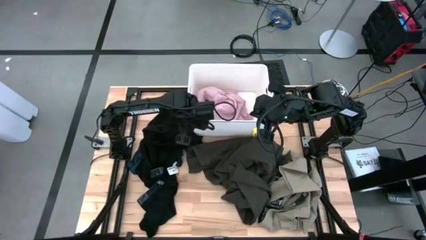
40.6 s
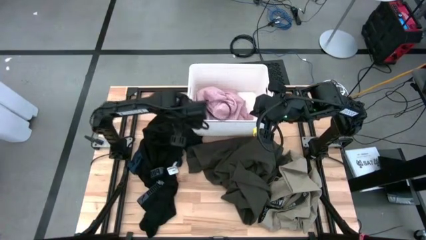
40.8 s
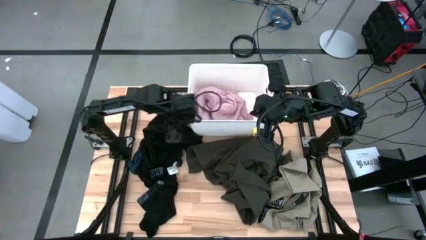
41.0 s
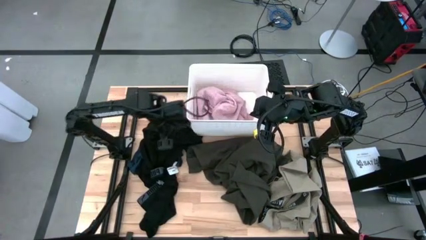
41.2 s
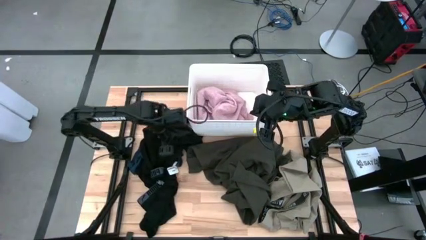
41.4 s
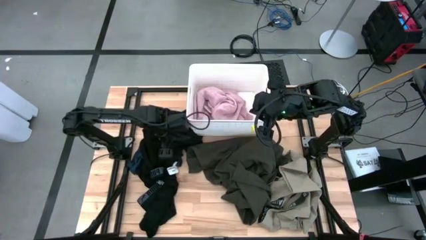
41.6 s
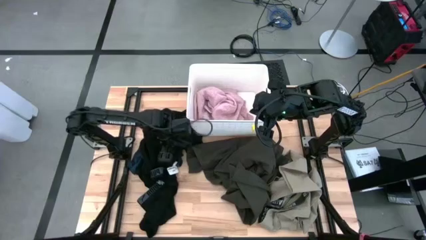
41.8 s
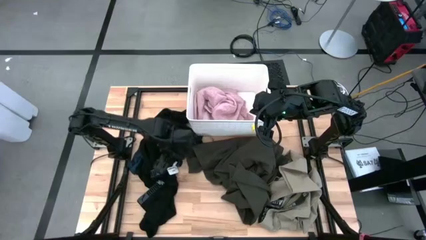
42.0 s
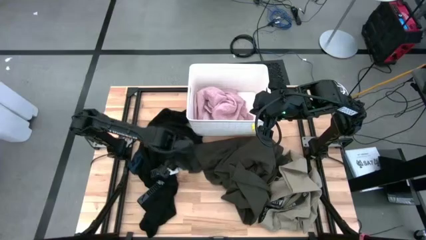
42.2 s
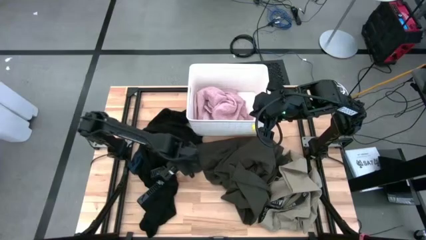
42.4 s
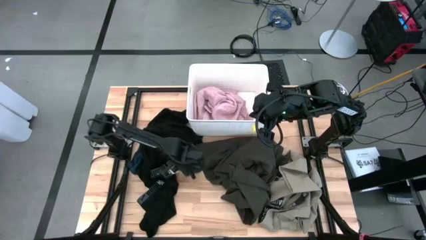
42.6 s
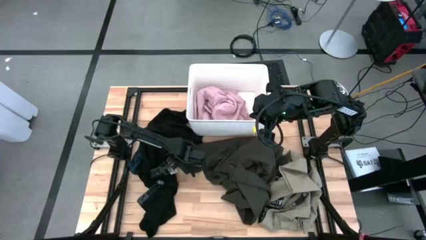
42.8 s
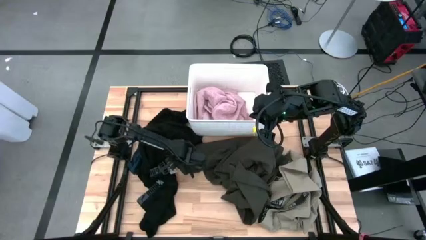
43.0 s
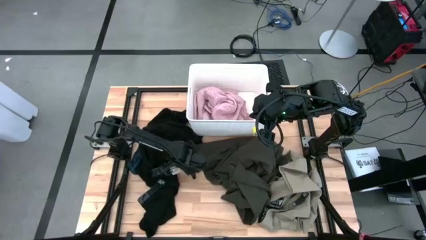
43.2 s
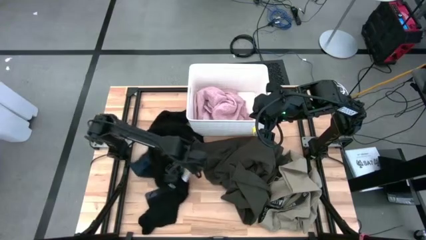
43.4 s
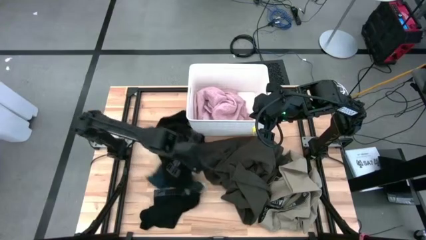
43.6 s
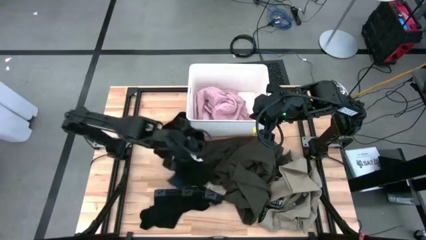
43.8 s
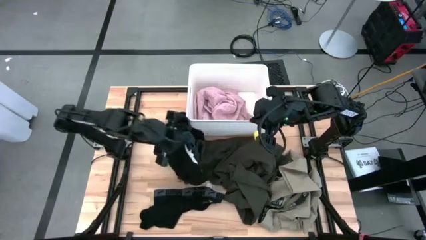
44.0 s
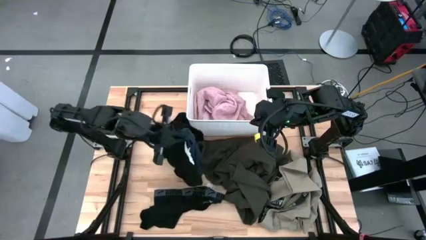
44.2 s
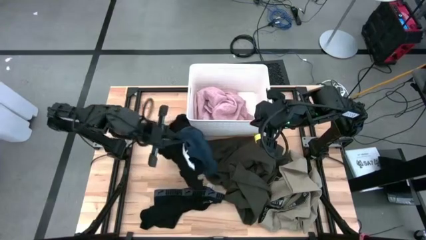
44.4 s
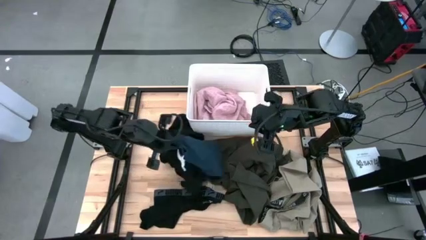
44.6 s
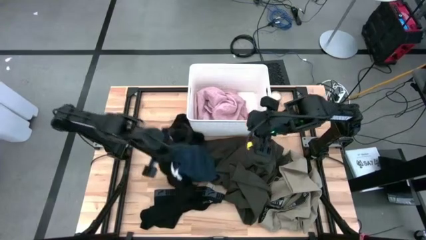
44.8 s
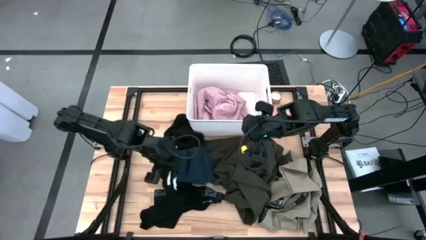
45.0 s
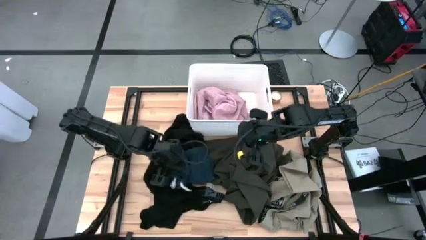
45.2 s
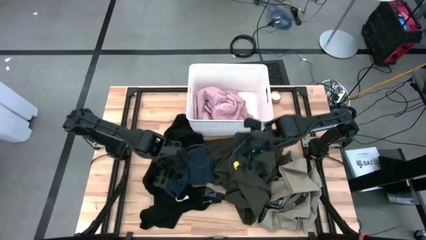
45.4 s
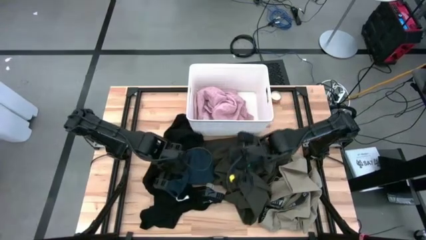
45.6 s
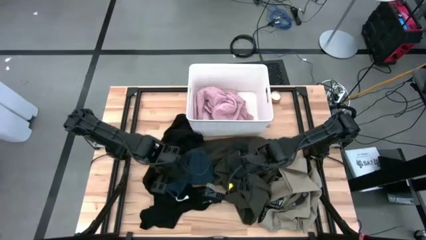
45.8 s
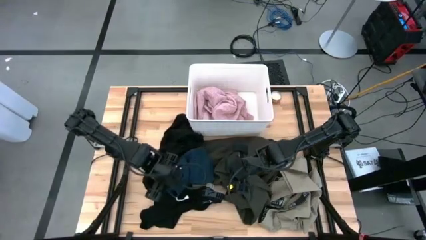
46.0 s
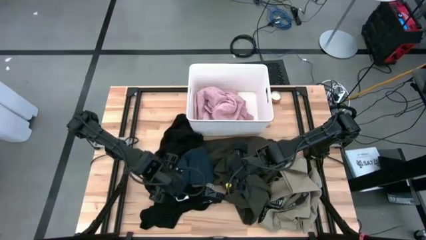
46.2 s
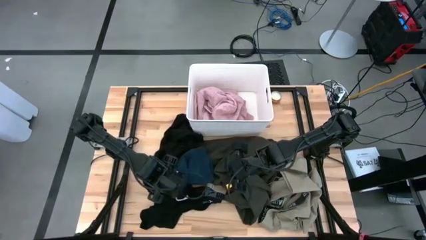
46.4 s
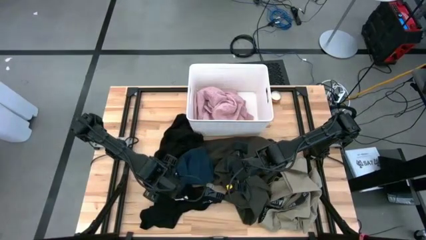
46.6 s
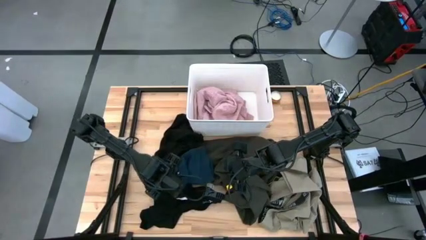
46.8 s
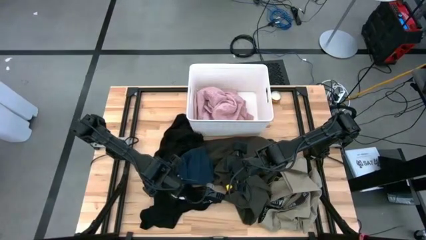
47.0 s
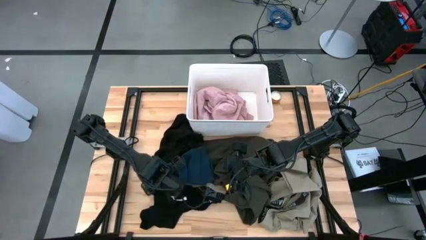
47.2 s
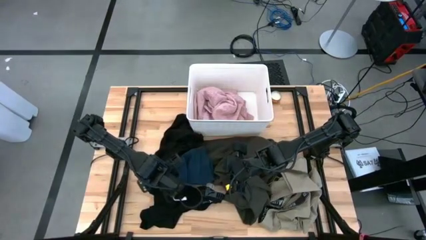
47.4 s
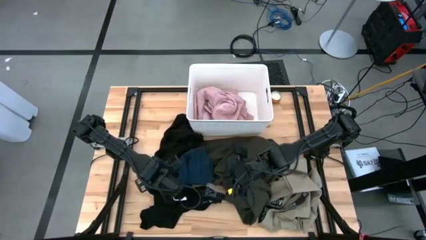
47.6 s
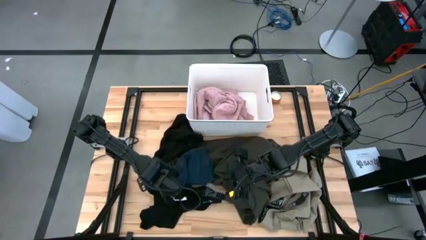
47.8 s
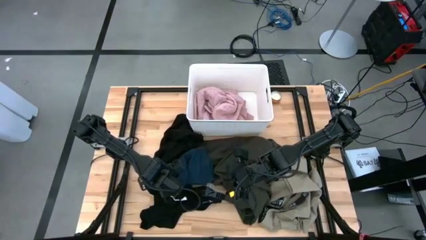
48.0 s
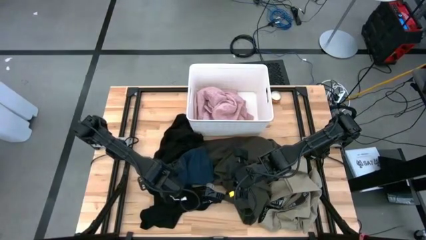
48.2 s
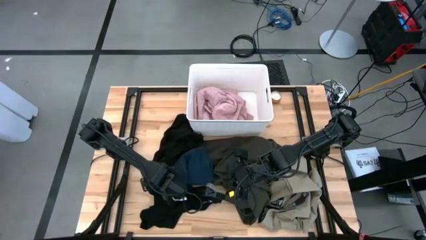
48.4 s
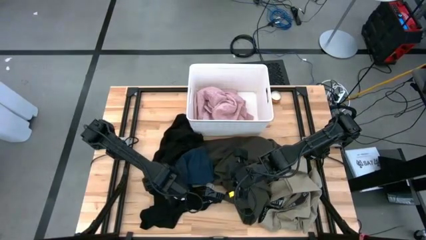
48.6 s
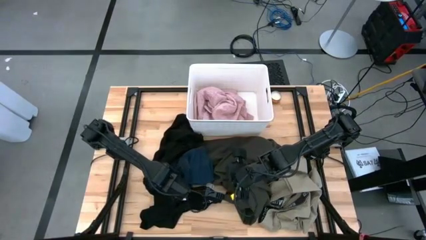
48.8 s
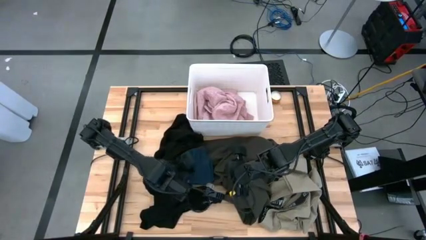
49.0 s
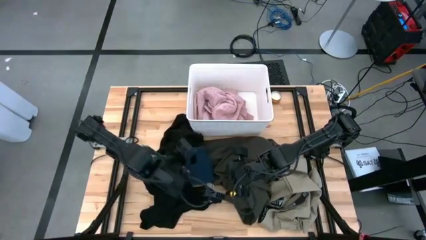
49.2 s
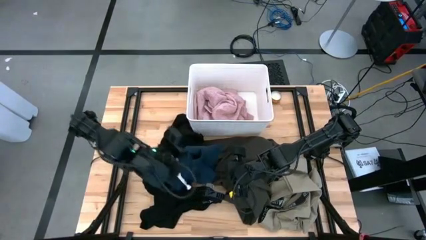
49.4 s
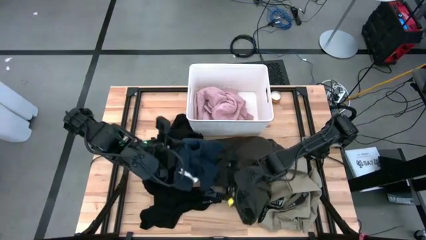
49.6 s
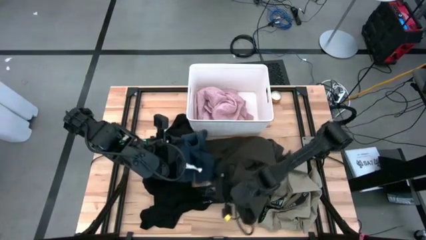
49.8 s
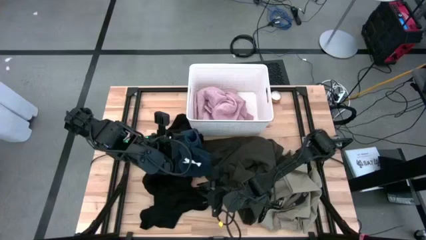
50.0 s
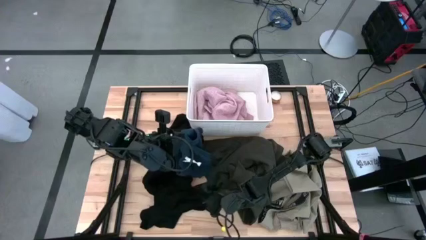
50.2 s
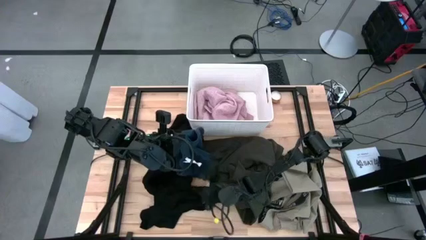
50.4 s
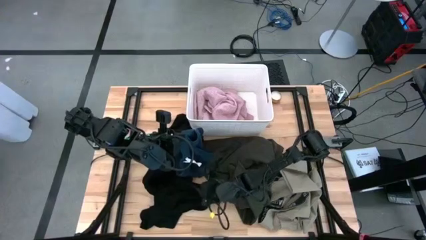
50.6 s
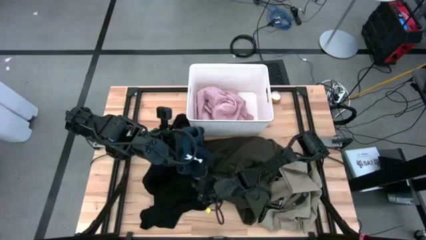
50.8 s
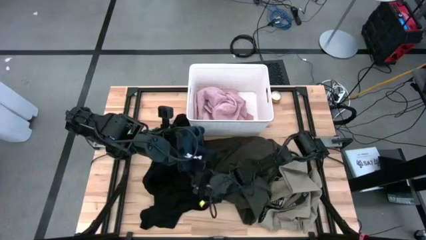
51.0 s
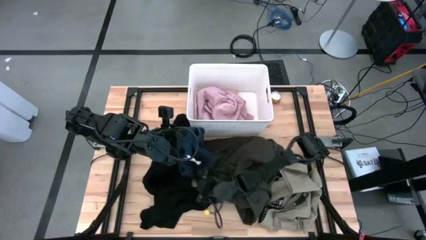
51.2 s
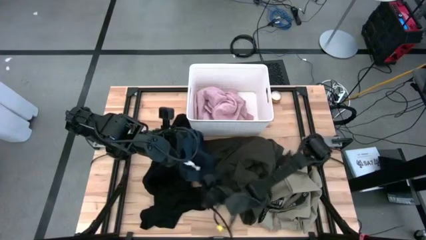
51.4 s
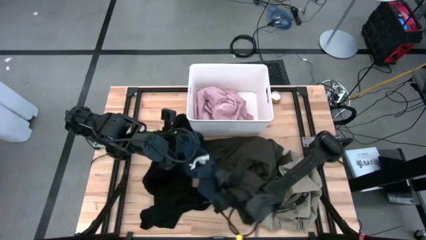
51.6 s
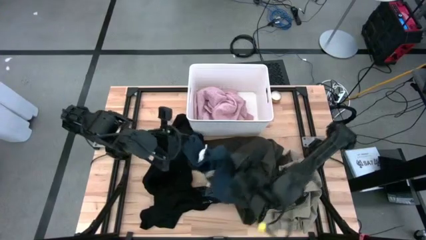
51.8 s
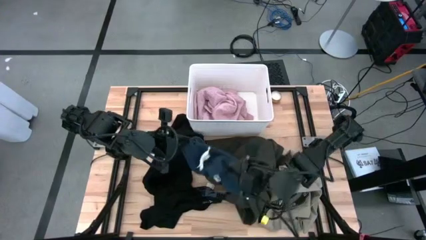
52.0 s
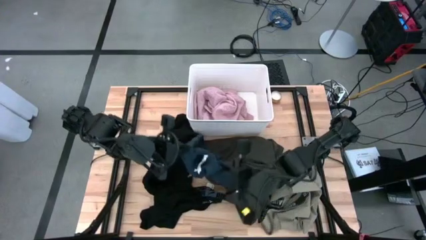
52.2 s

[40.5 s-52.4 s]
Task: Sort clothes
Put the dark blue shorts into the white bin

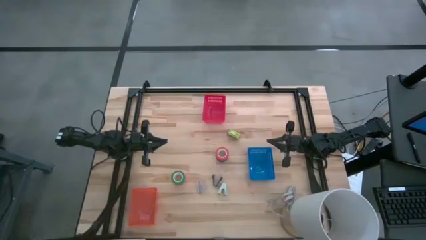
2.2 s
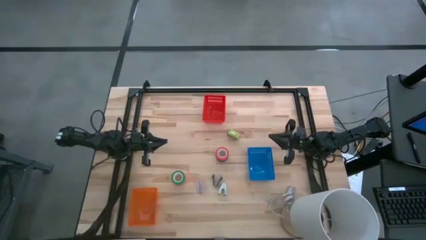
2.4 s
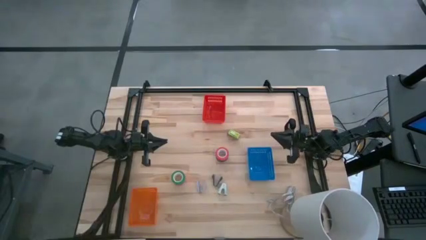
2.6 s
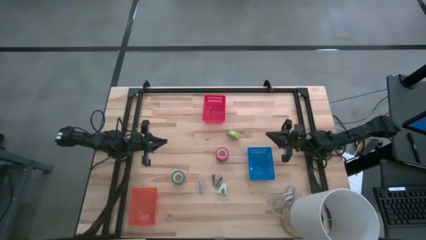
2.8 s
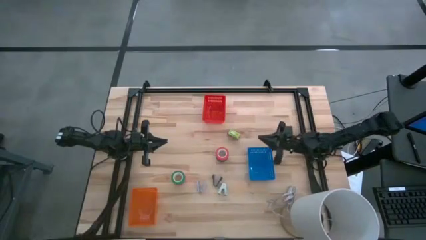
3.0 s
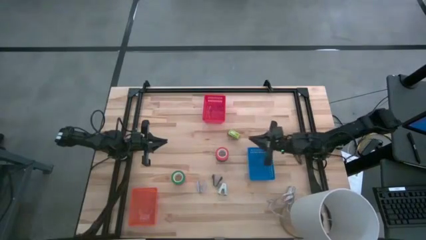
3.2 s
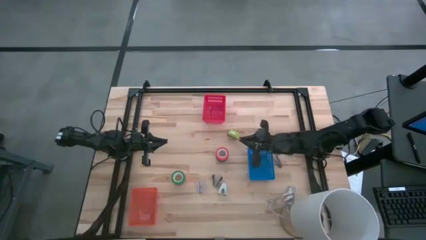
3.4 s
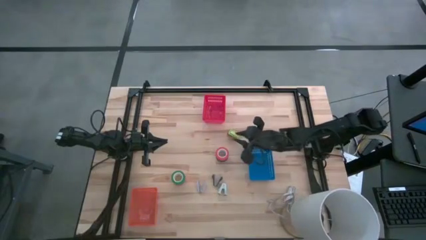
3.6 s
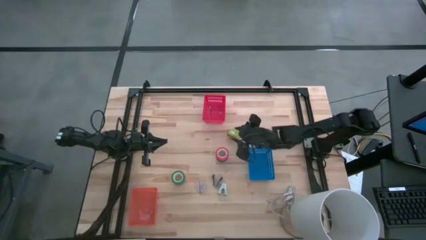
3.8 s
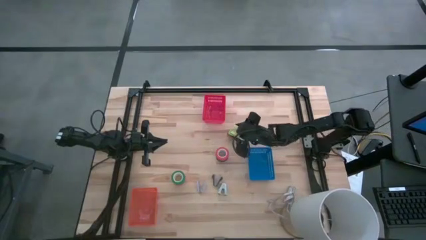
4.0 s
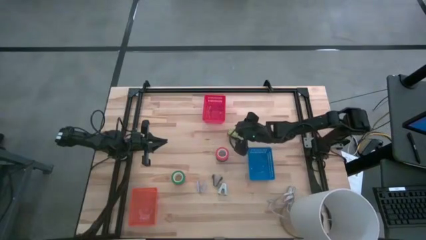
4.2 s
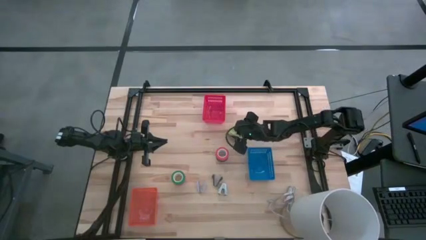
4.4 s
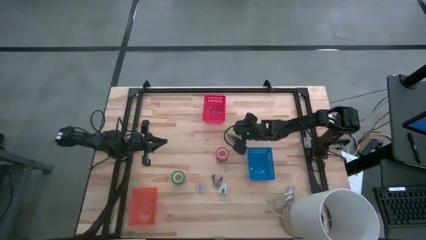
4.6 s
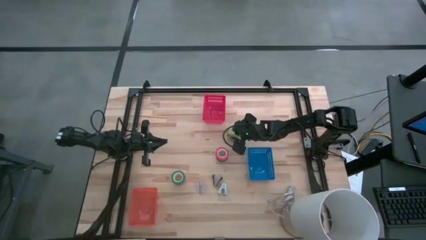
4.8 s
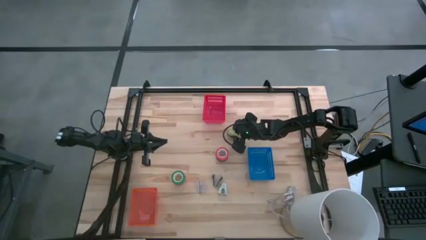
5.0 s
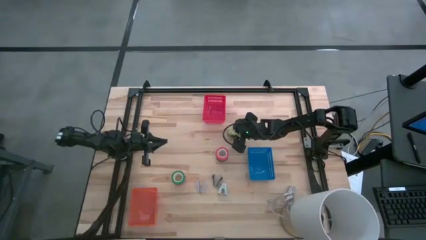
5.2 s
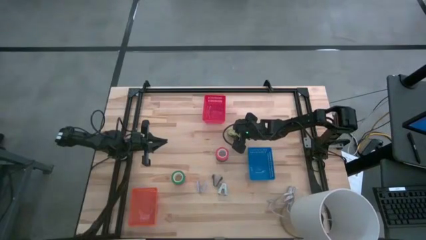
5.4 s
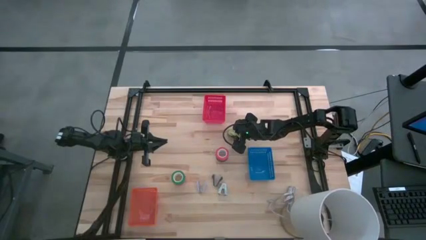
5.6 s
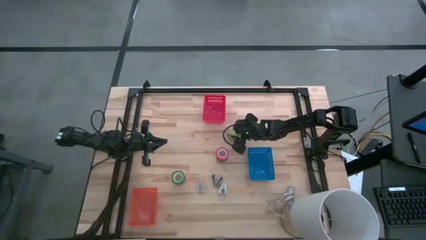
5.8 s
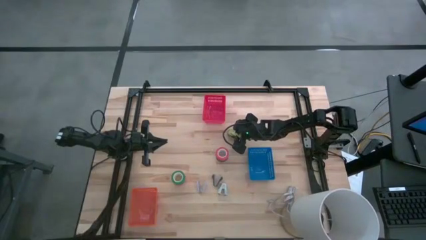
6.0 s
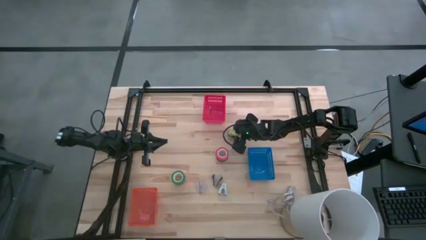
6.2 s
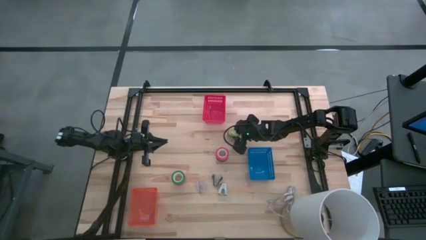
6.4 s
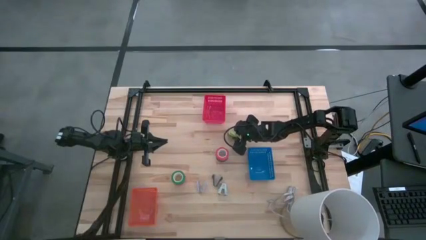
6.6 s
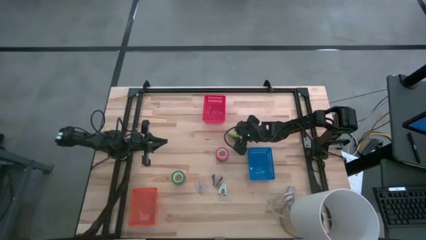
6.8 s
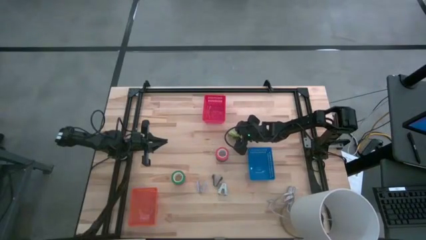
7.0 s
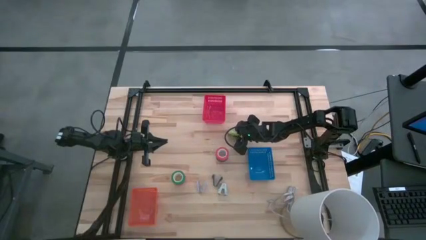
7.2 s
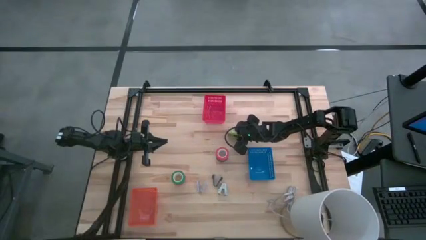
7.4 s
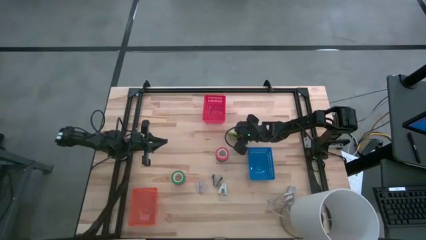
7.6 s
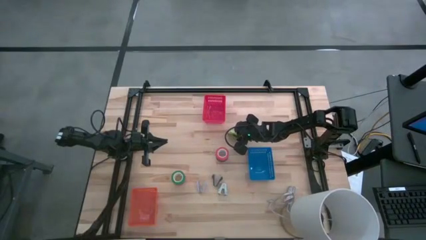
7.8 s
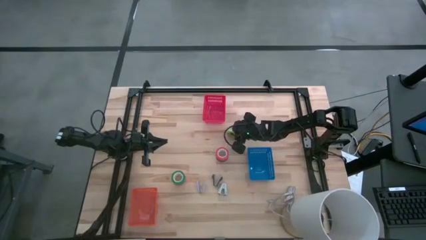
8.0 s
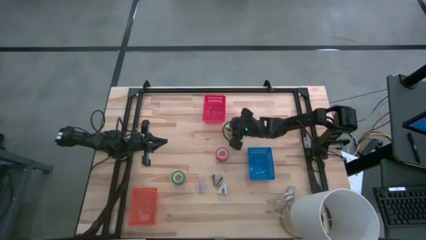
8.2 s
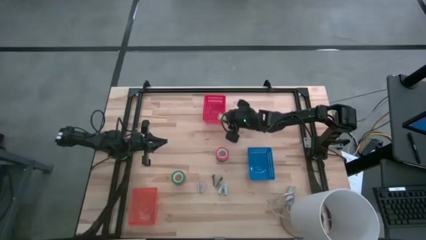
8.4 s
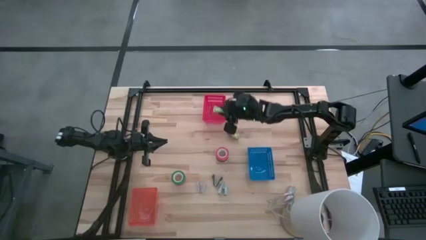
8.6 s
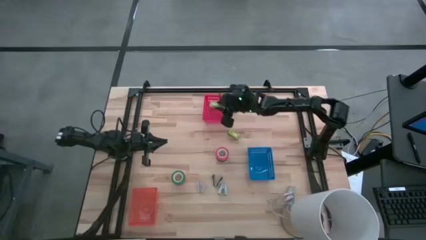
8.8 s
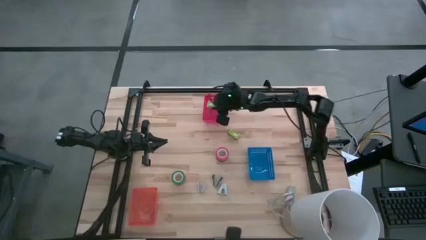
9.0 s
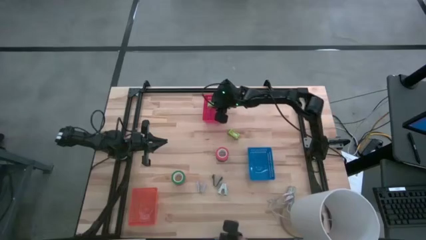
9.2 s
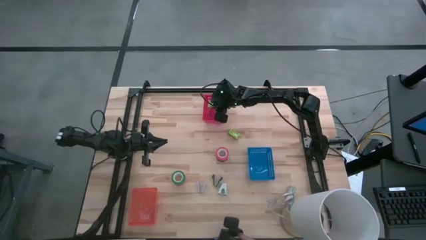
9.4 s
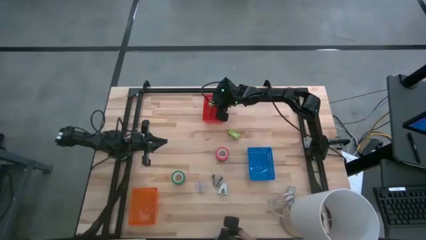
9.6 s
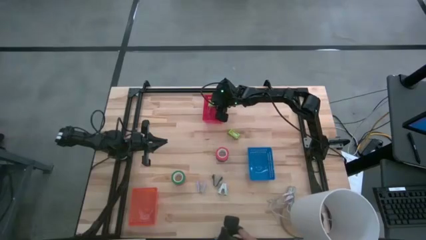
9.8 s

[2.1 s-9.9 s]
Task: Pick and place Stapler, Stapler remover, tape
Put the top green staple box into the red bin
